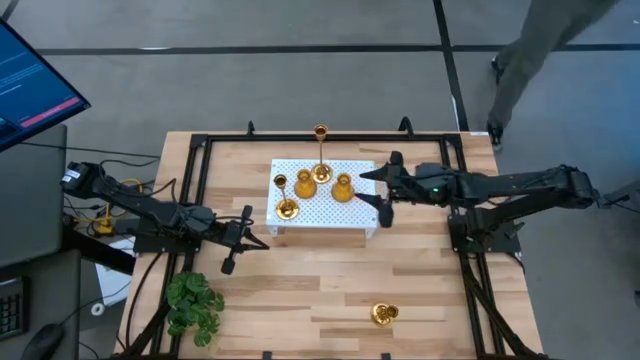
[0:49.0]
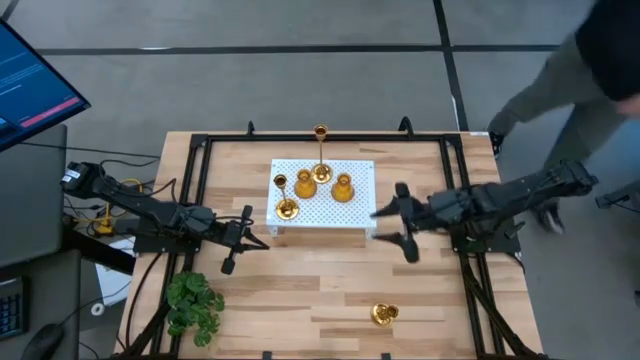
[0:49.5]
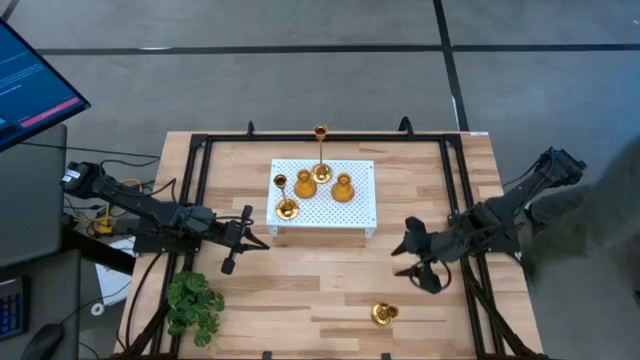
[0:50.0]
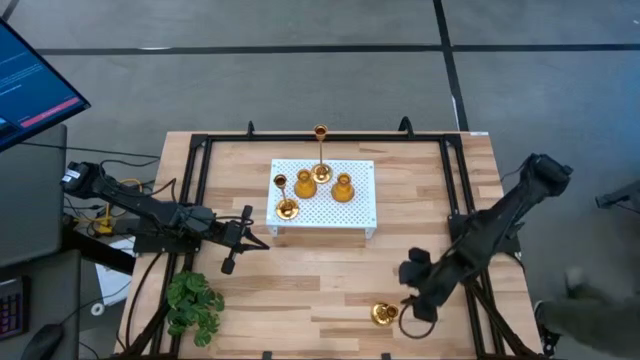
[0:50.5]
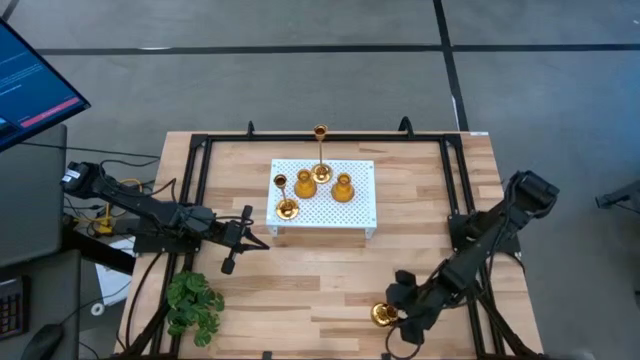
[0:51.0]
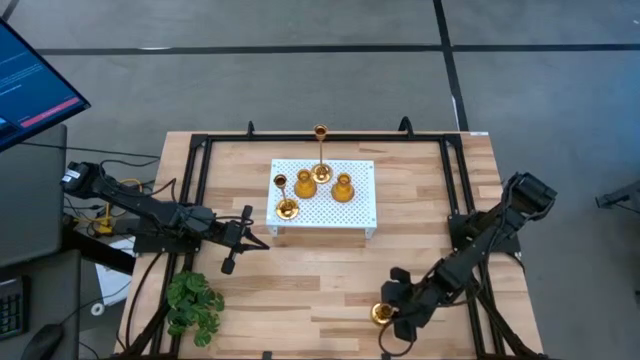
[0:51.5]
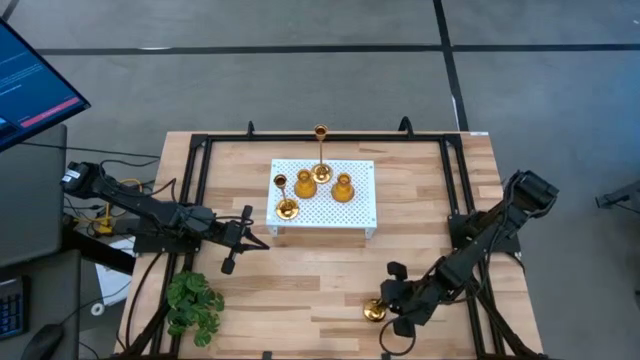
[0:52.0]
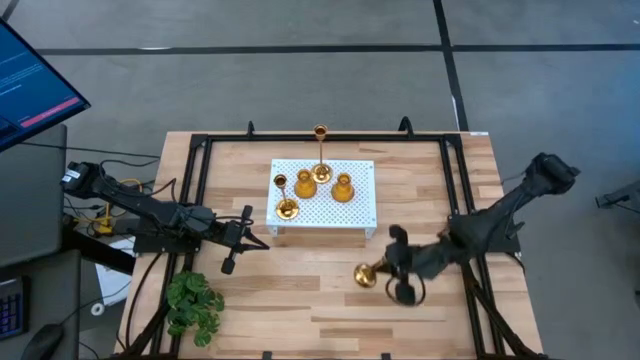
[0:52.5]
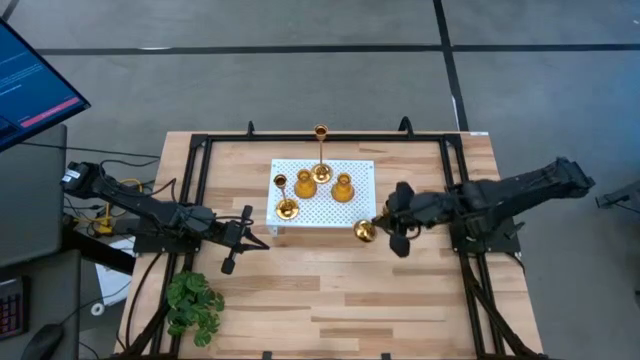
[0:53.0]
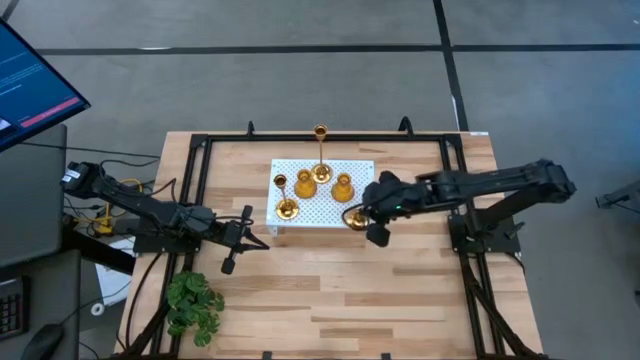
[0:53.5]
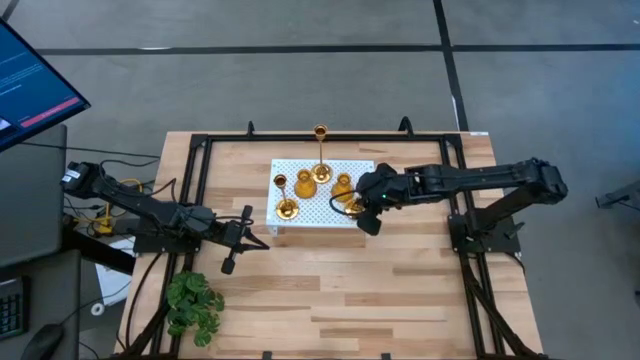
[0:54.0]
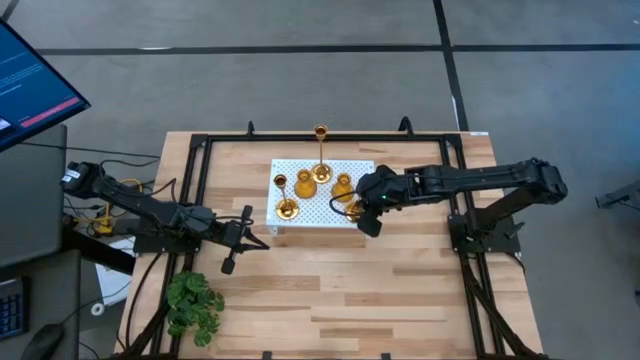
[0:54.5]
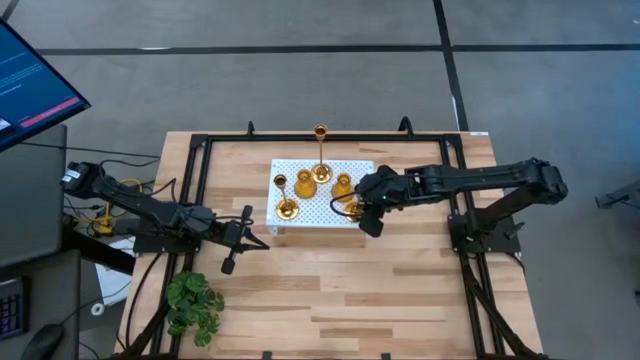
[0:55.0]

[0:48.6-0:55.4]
Task: Pick & Place candle stick holders
Put the gold candle holder on the shelf

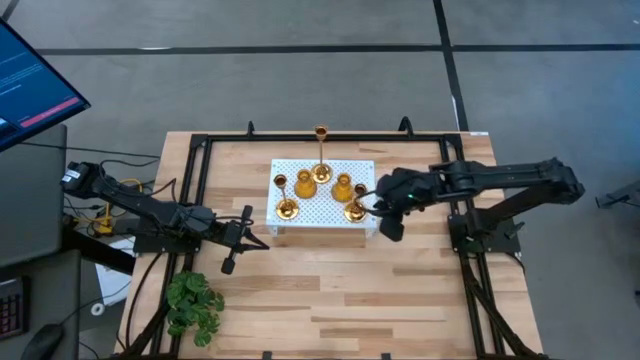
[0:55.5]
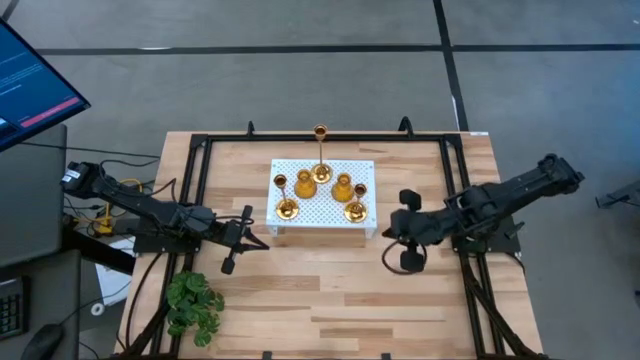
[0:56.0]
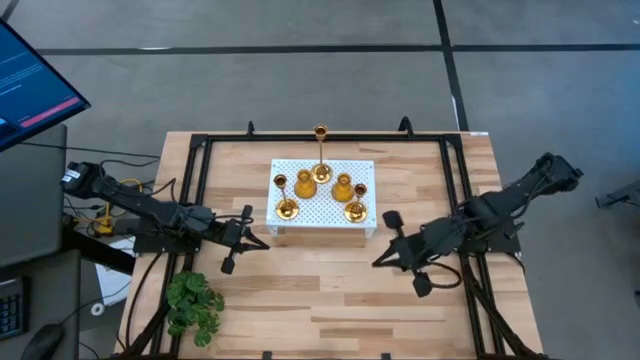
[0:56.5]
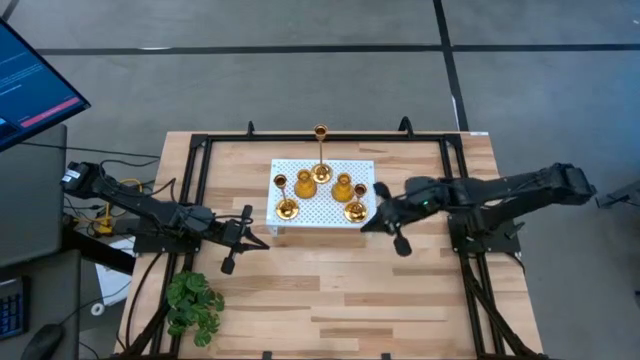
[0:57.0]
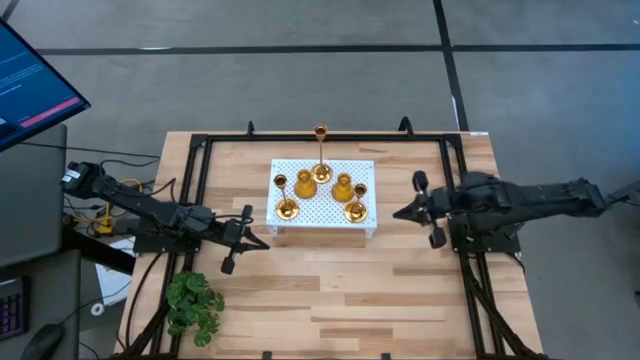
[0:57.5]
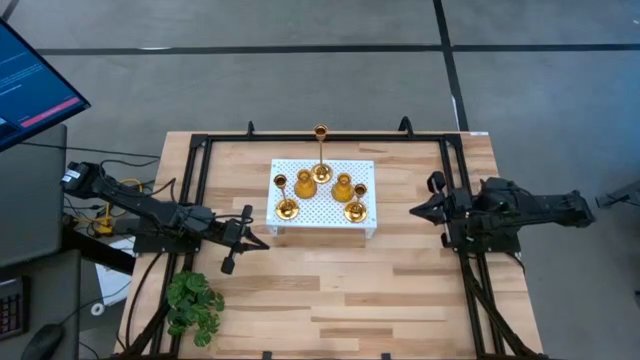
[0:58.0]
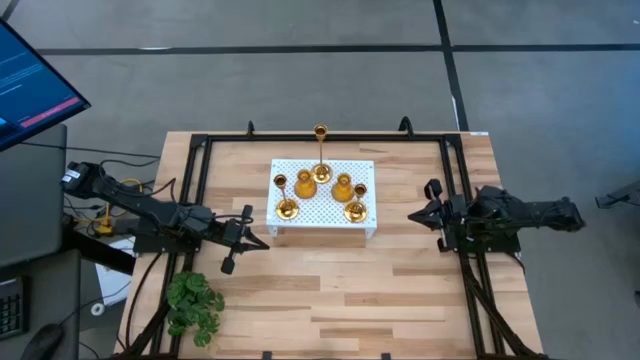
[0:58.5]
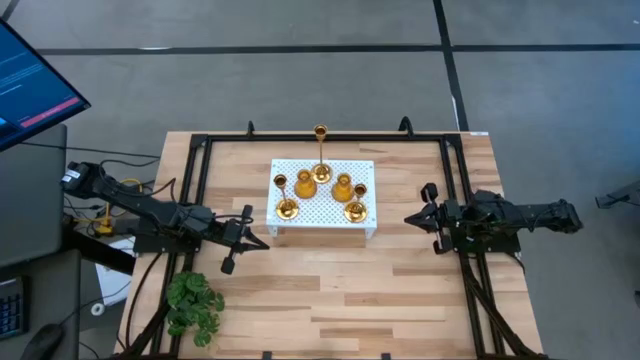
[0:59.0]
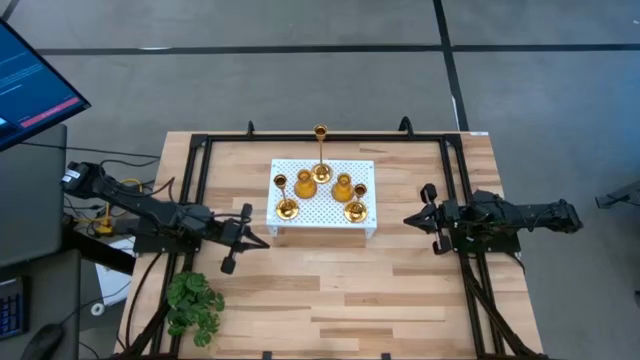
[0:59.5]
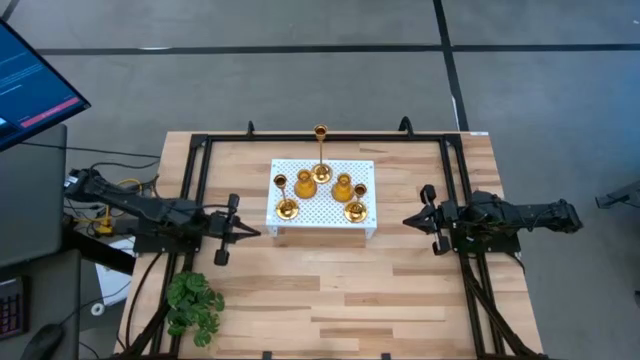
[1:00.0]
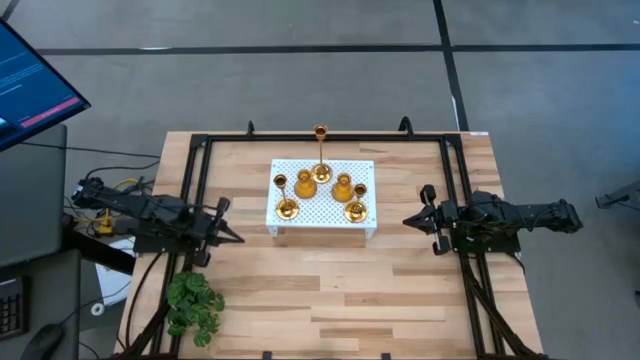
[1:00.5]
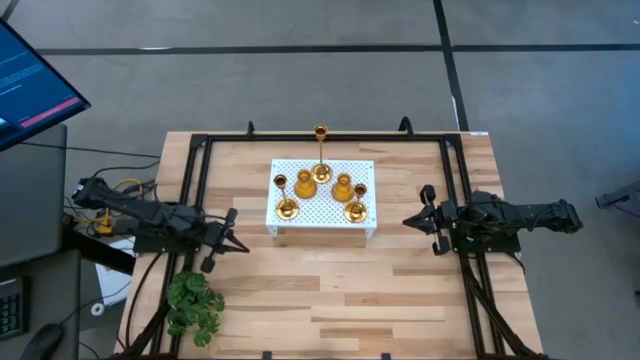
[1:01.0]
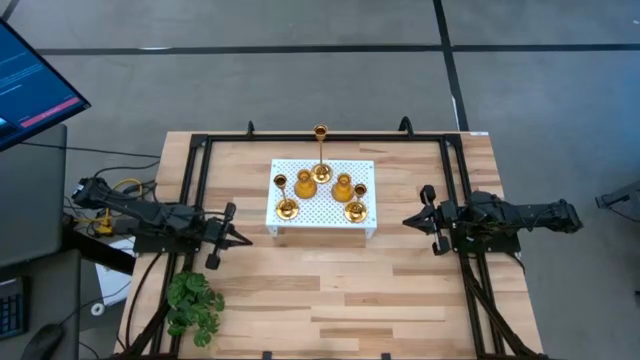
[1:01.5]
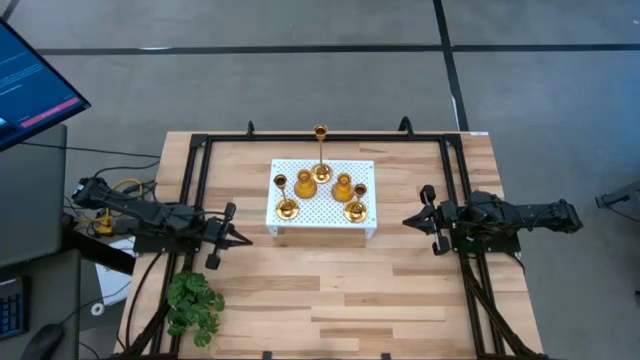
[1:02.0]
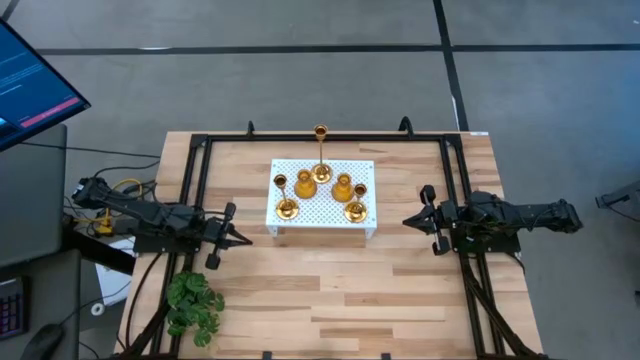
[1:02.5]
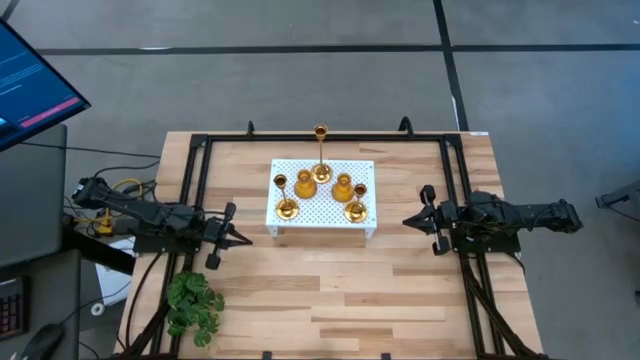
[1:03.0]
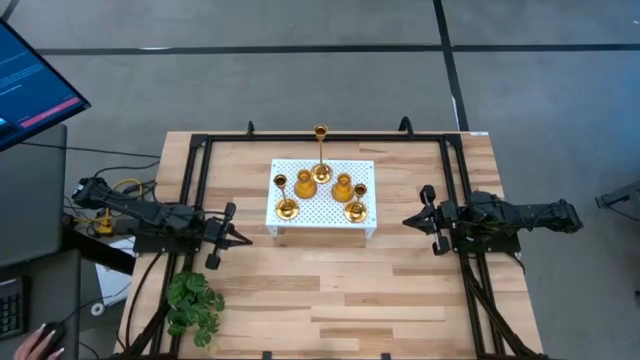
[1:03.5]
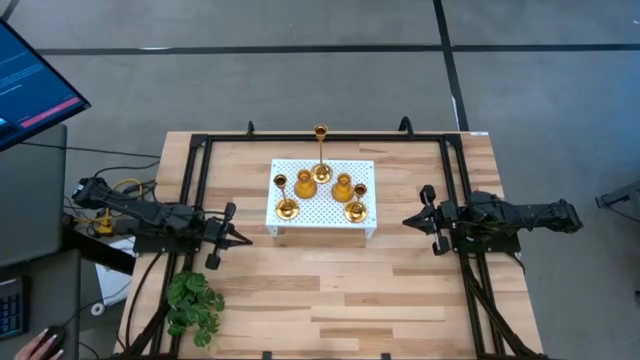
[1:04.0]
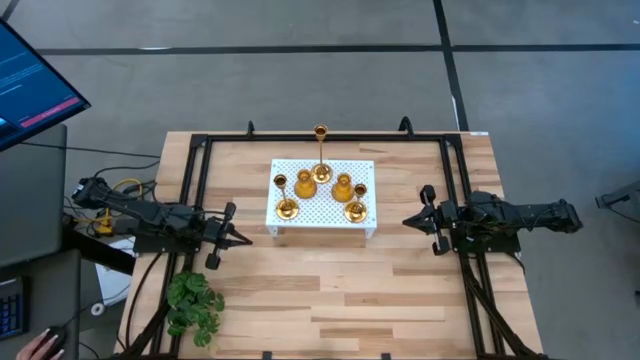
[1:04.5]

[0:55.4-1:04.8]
Return to Home Position

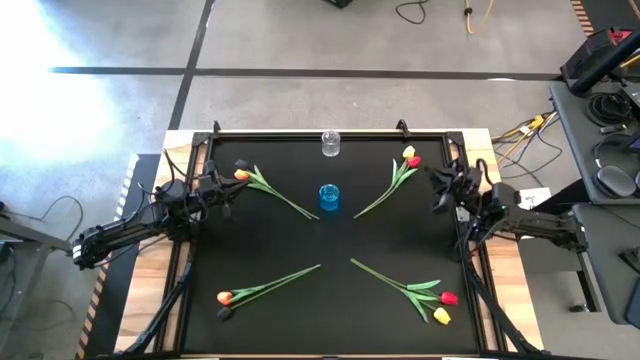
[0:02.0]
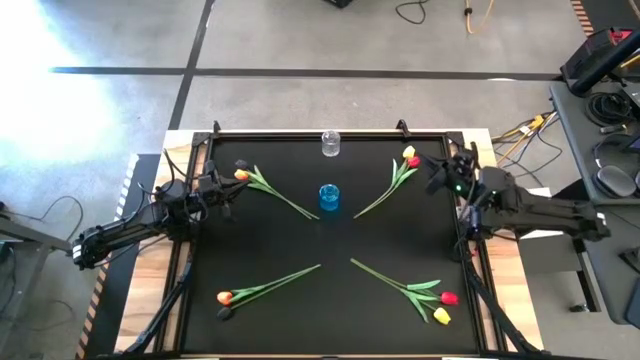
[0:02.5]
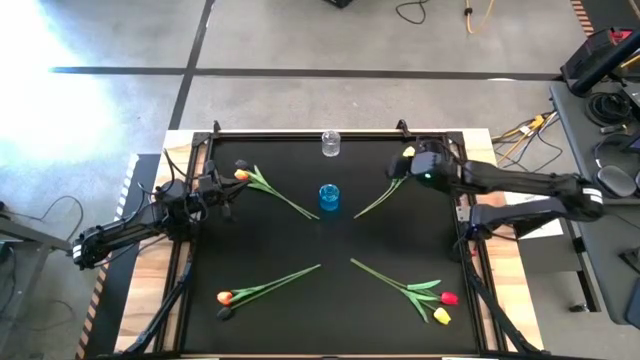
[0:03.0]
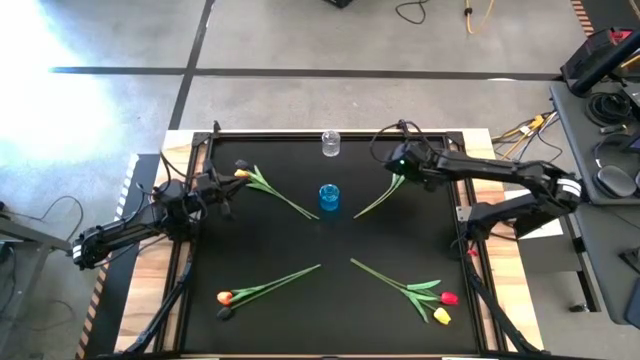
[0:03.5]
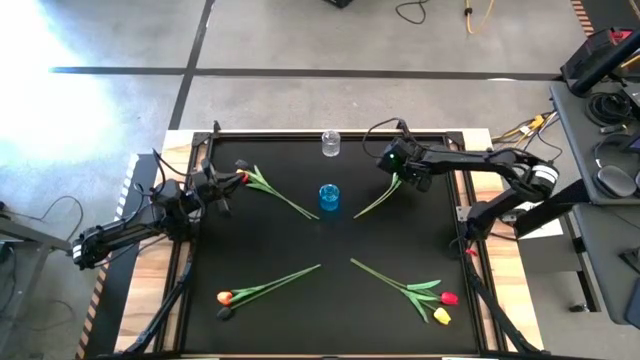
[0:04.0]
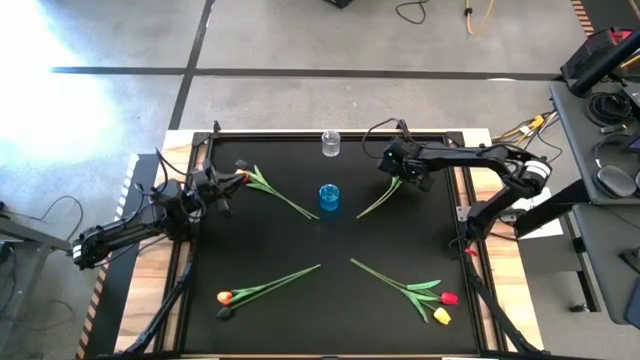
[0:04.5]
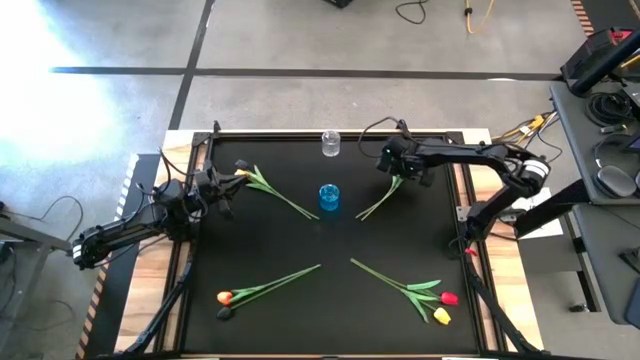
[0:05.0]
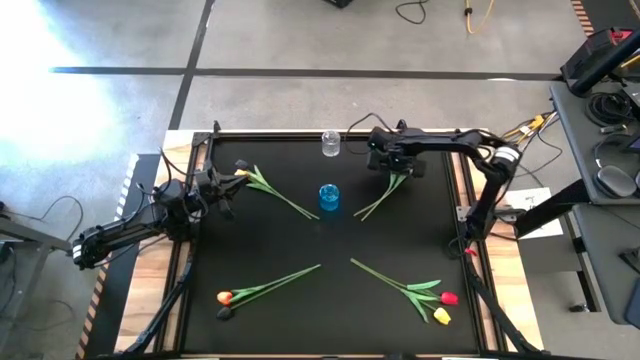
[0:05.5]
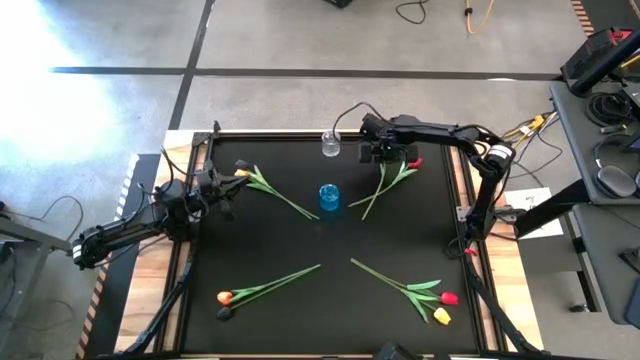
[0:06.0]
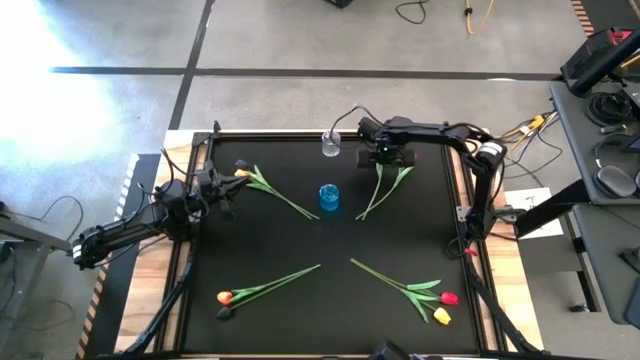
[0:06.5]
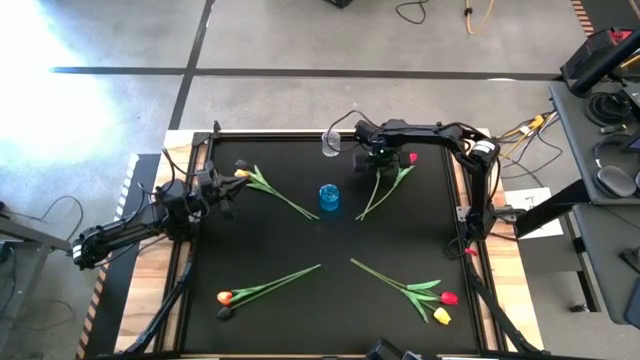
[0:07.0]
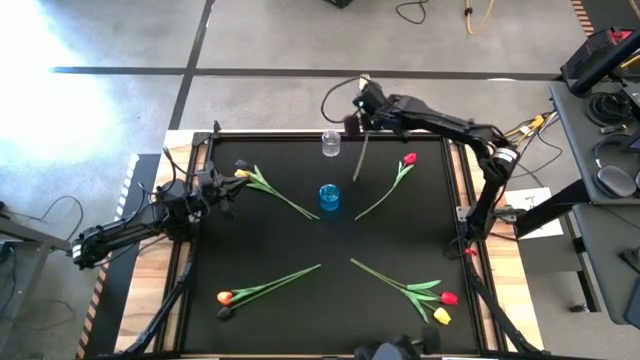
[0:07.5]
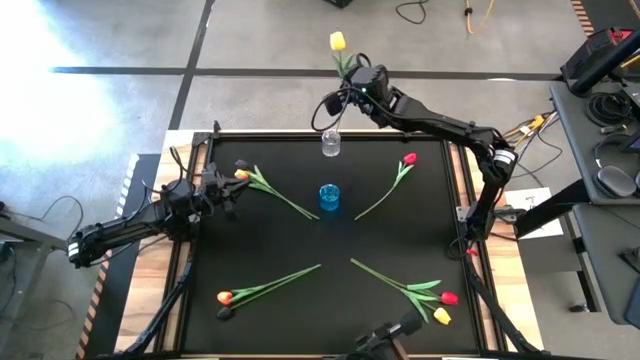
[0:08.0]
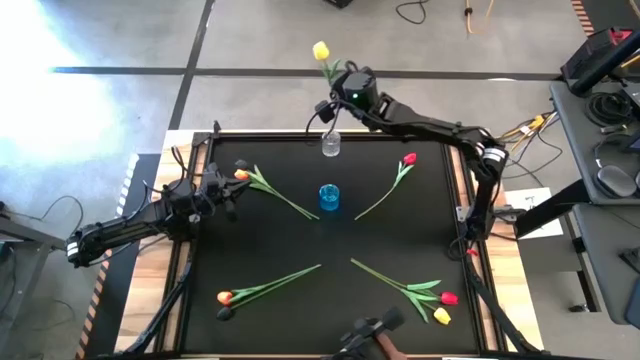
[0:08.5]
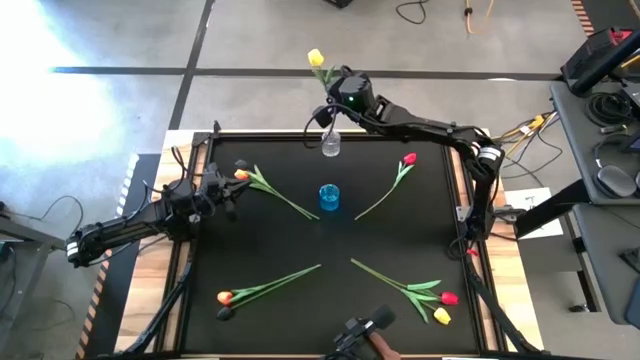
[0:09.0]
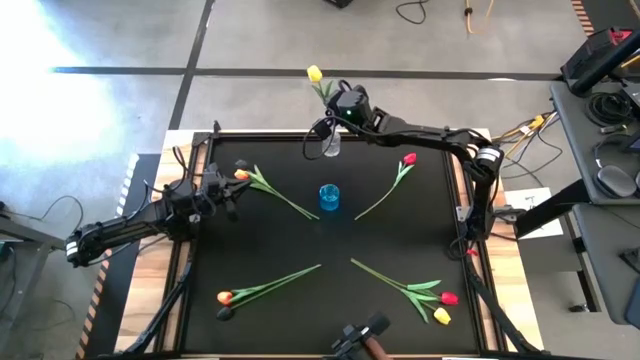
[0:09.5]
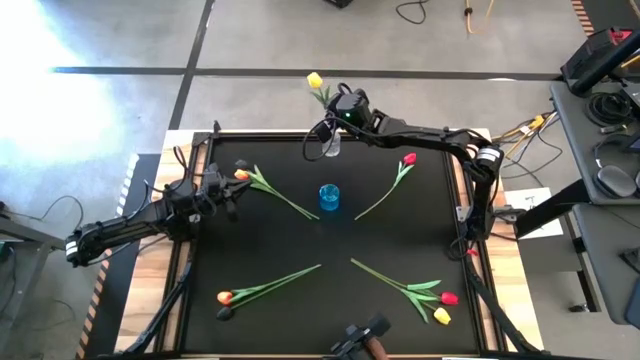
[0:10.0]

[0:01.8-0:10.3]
Task: Sort flowers into vase by color
Put the top yellow tulip flower into the transparent vase
